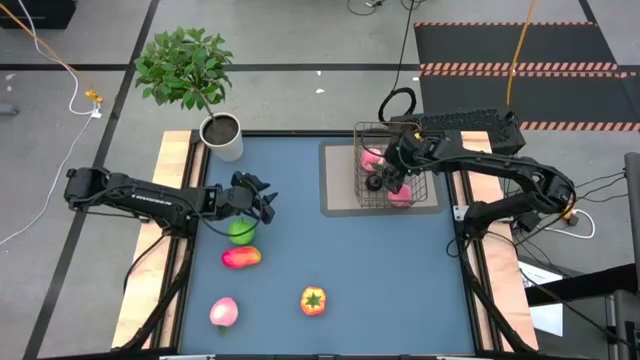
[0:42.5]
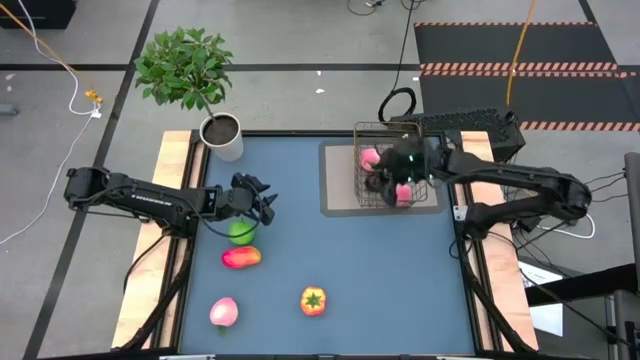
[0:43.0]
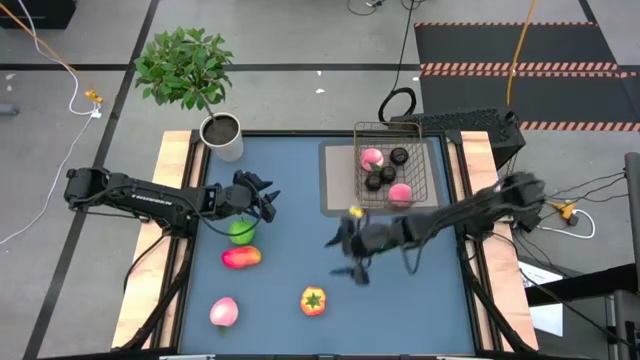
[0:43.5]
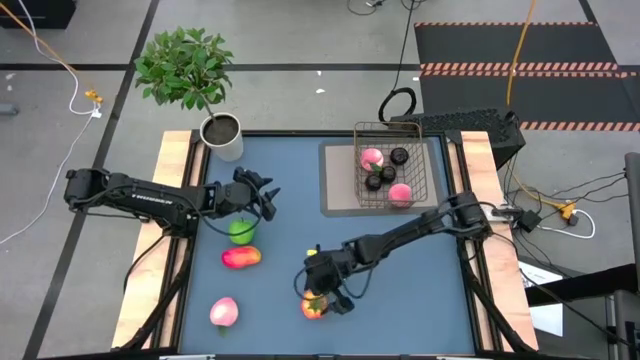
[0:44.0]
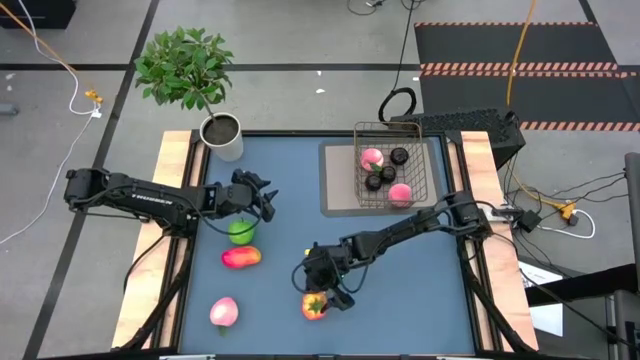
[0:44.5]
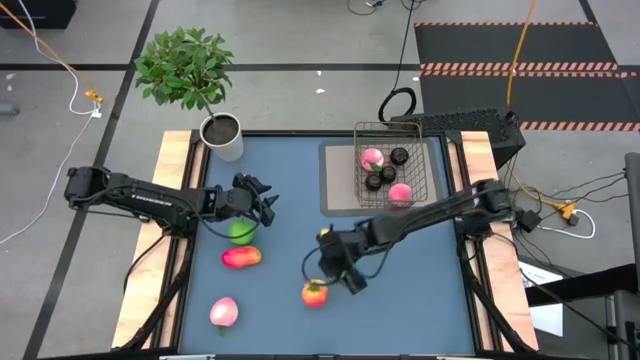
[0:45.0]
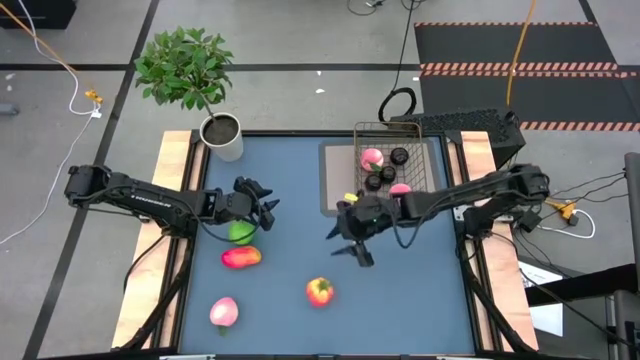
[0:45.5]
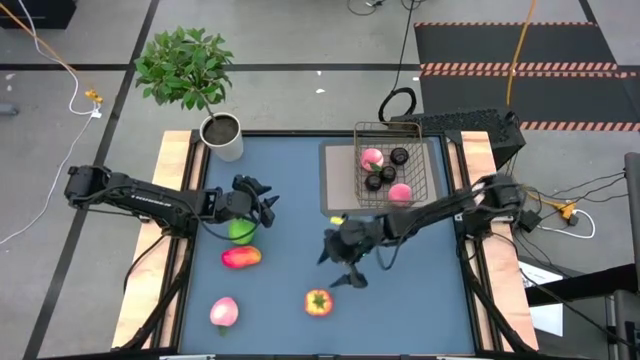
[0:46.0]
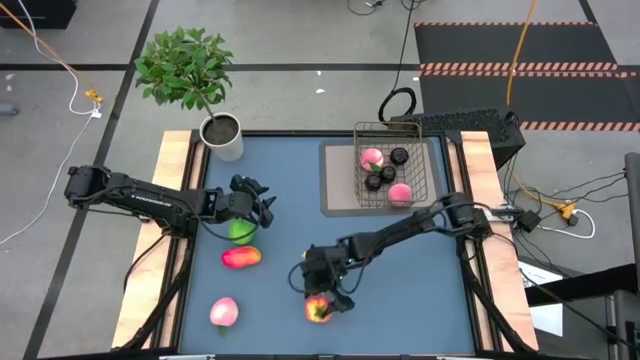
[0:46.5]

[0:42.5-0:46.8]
Task: Build produce basket
Put the orange tomato into the gold wire basket

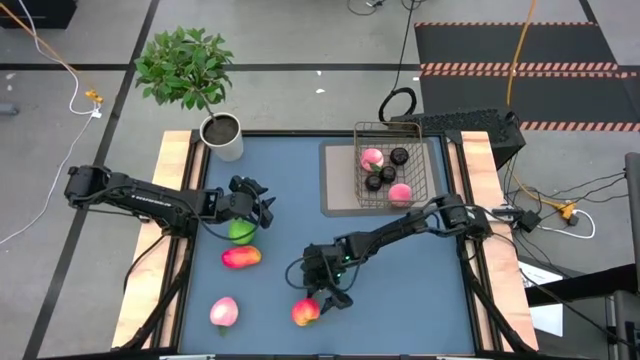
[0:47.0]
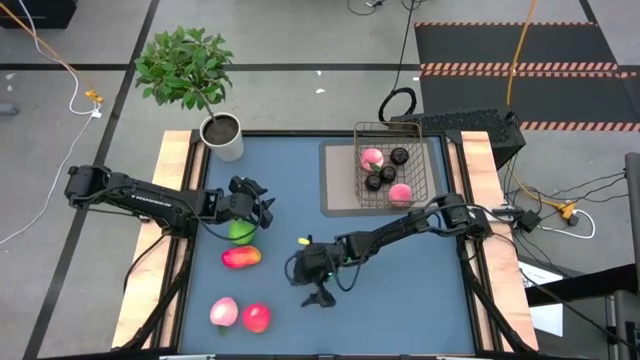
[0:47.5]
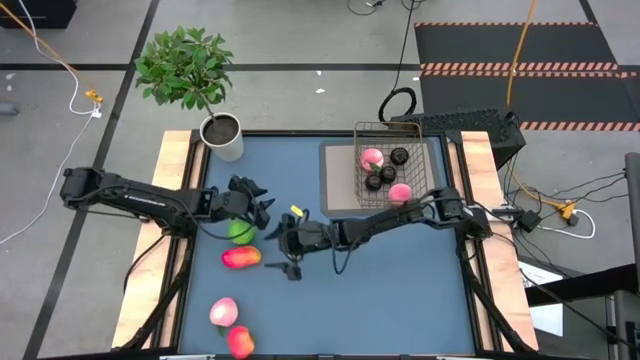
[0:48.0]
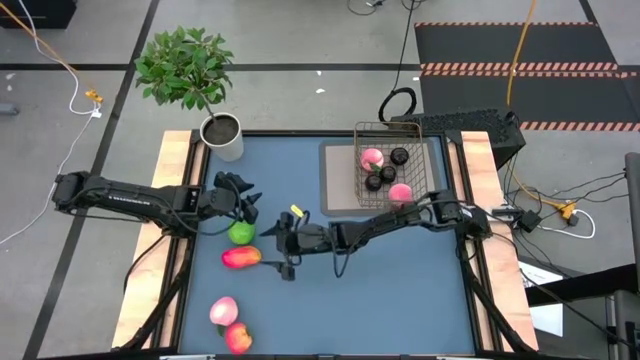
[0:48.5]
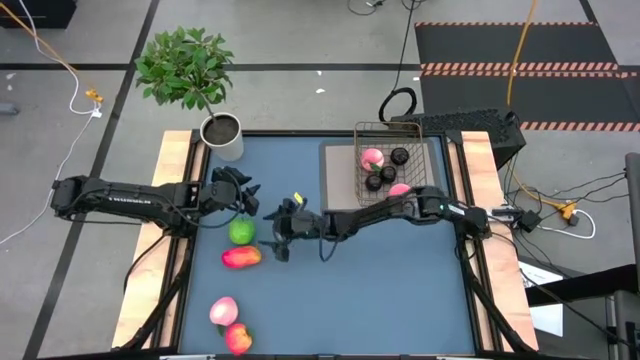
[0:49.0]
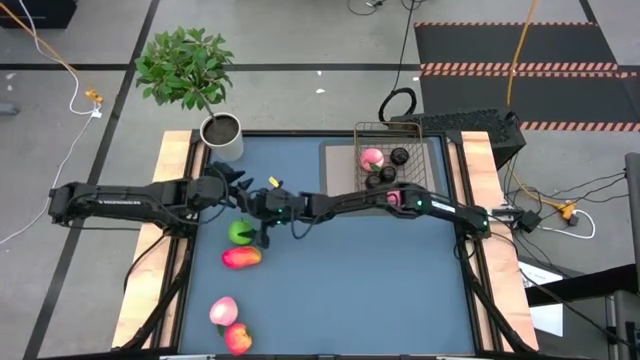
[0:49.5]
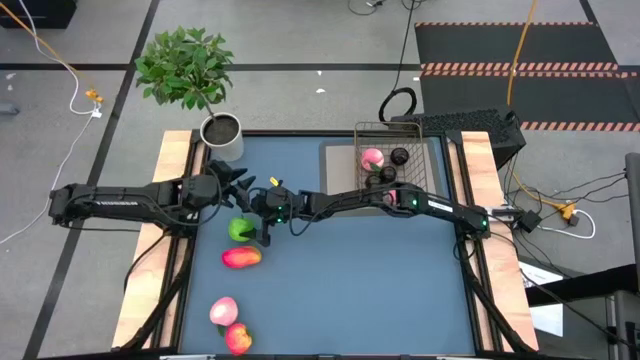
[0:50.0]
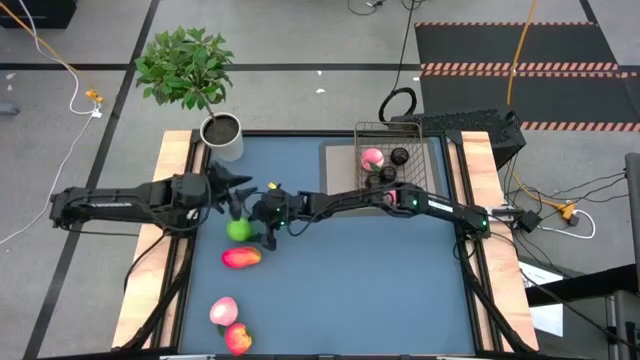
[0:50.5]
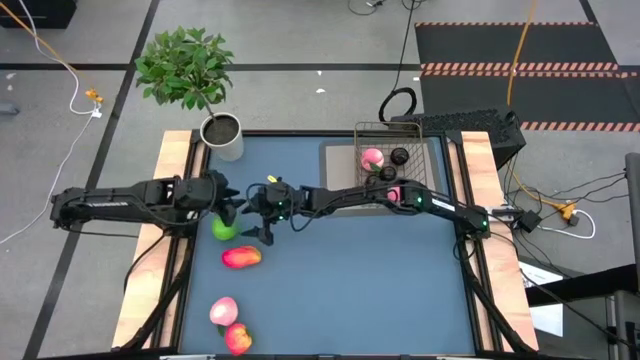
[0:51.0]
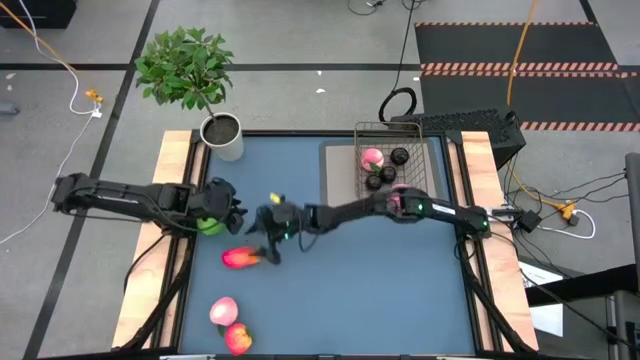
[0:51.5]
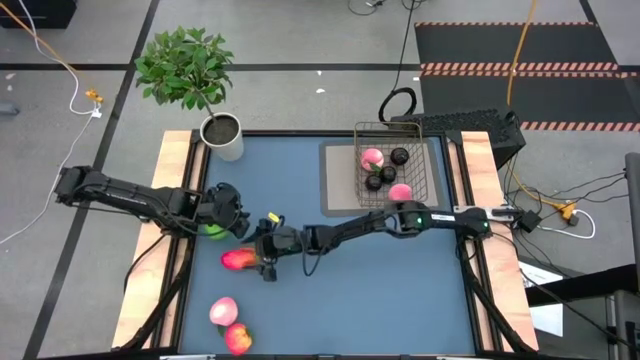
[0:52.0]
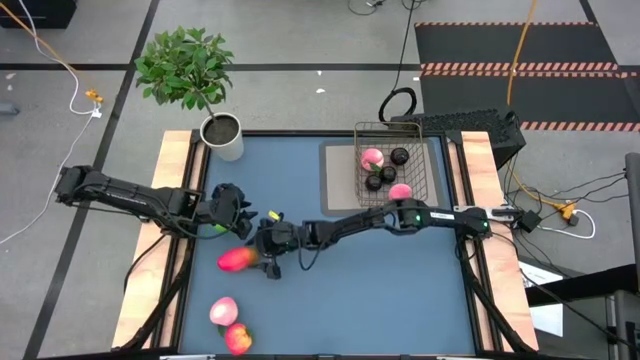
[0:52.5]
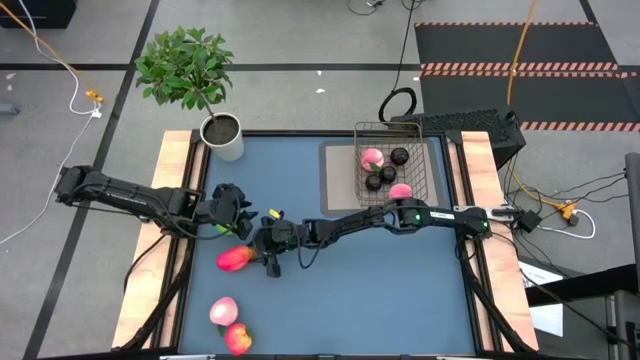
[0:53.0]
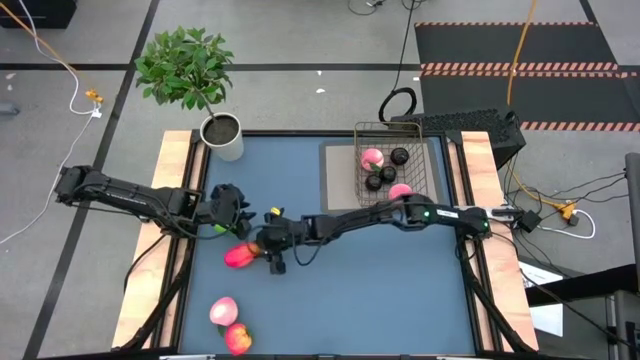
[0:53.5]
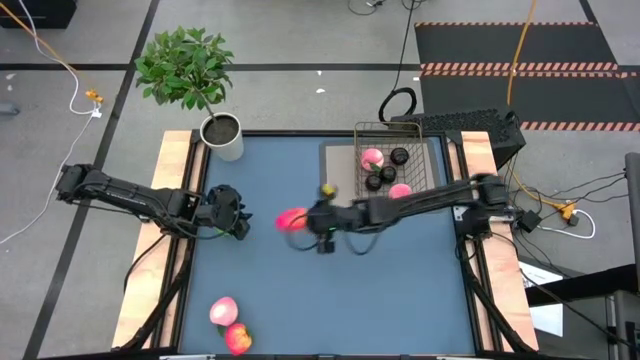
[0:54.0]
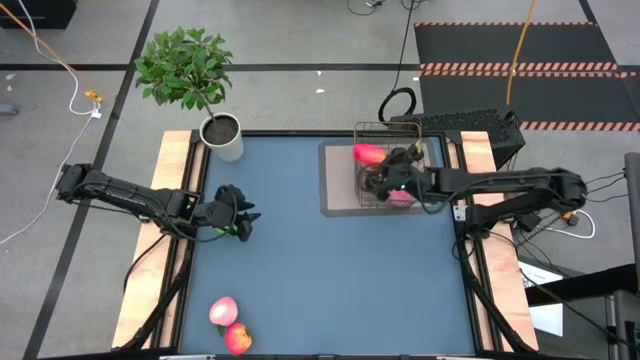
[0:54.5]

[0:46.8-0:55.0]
Put the red mango into the gold wire basket

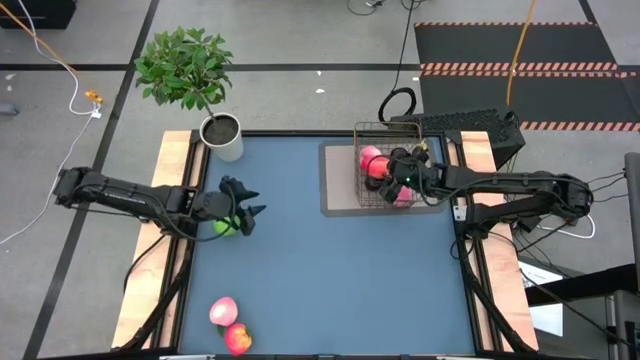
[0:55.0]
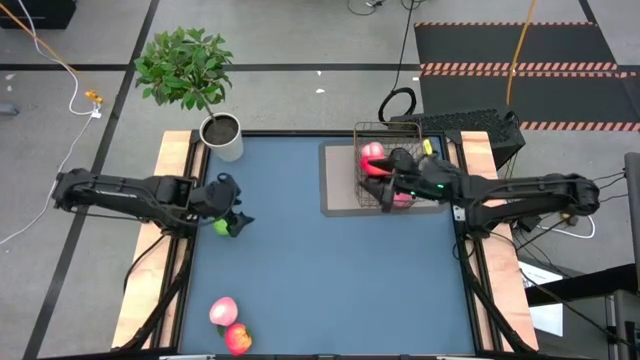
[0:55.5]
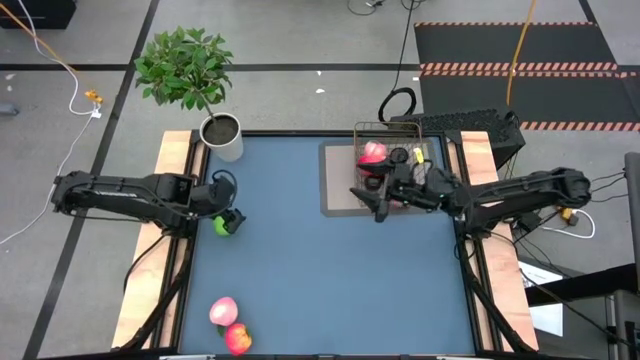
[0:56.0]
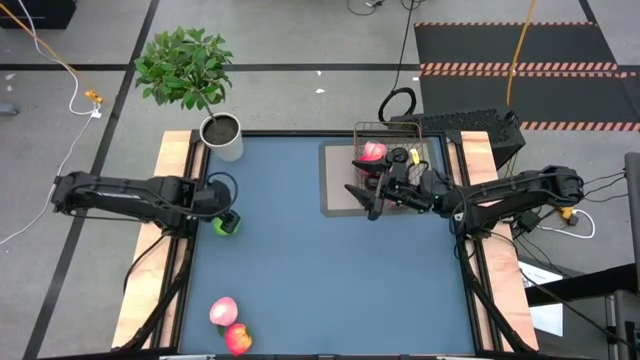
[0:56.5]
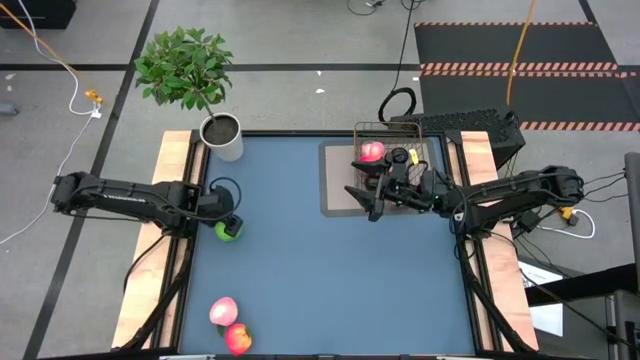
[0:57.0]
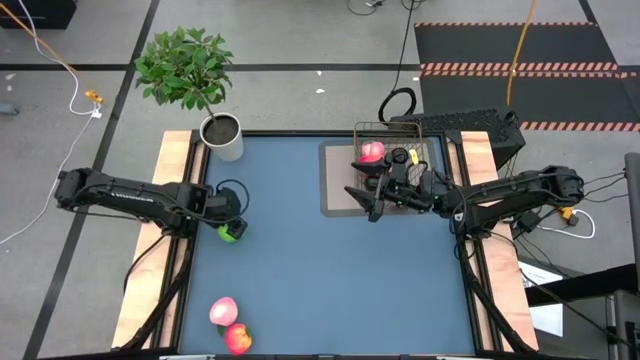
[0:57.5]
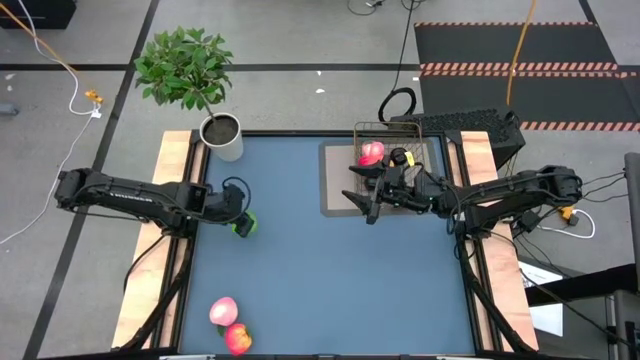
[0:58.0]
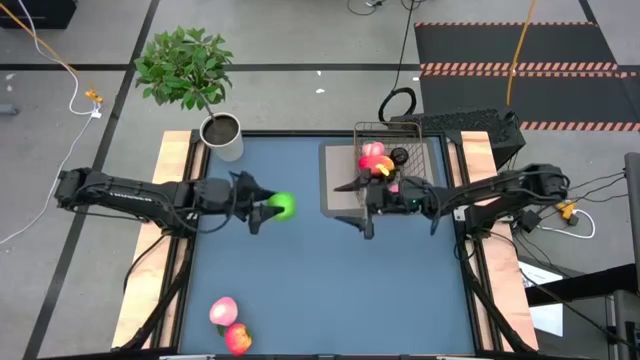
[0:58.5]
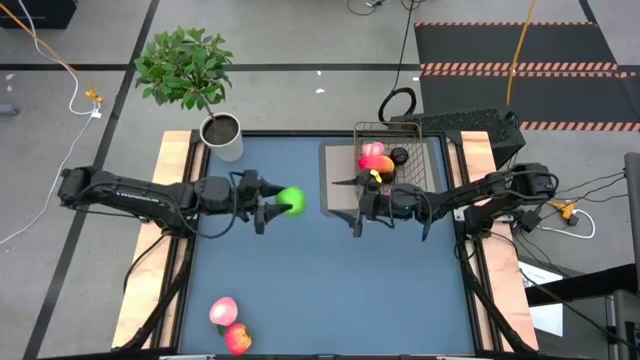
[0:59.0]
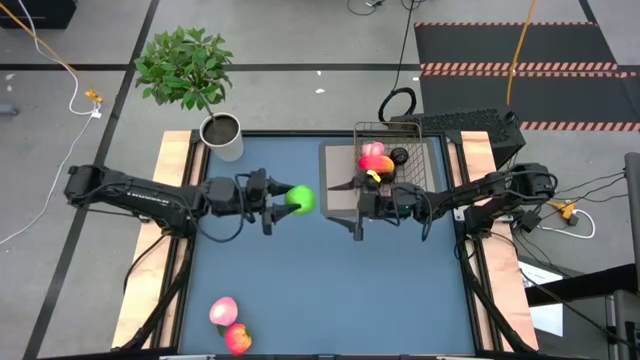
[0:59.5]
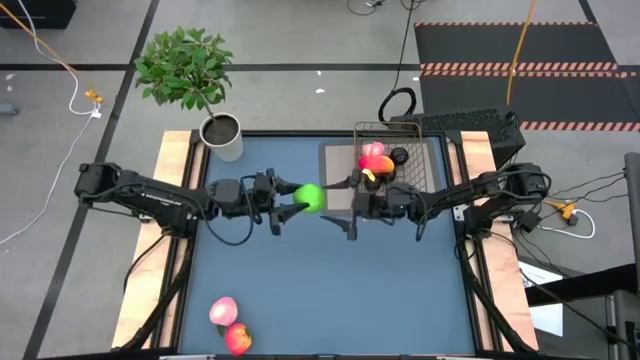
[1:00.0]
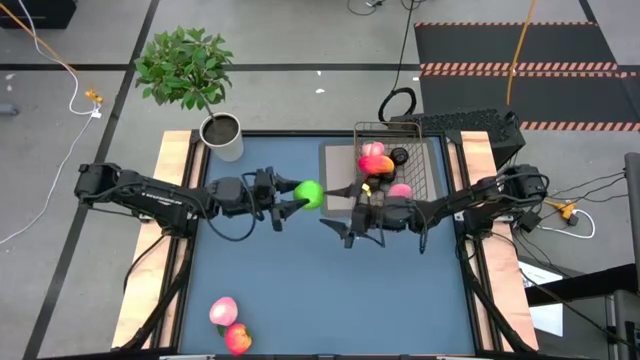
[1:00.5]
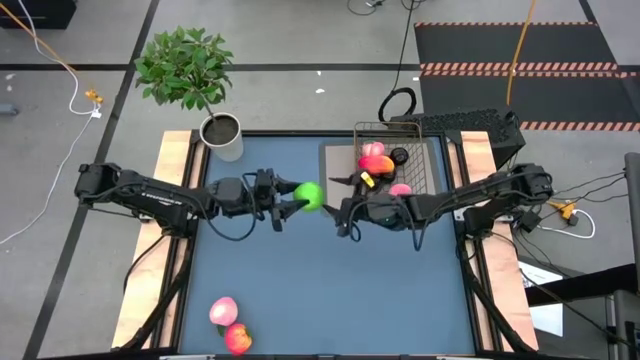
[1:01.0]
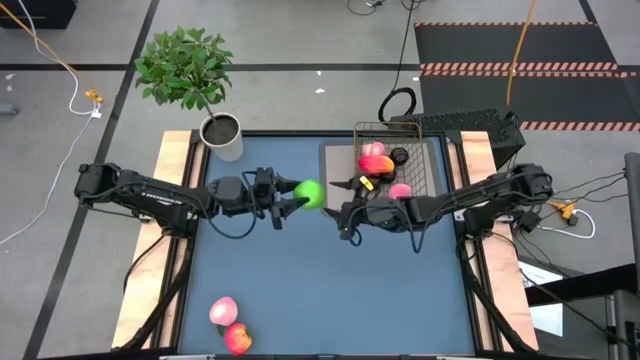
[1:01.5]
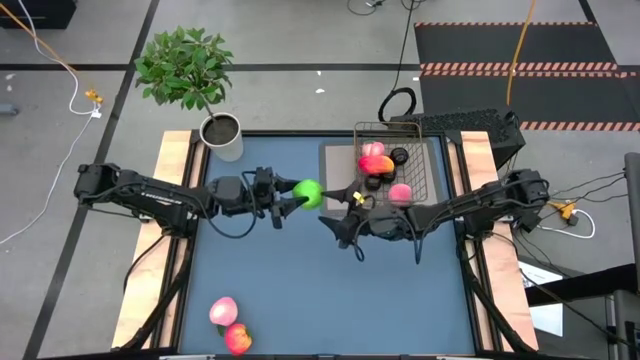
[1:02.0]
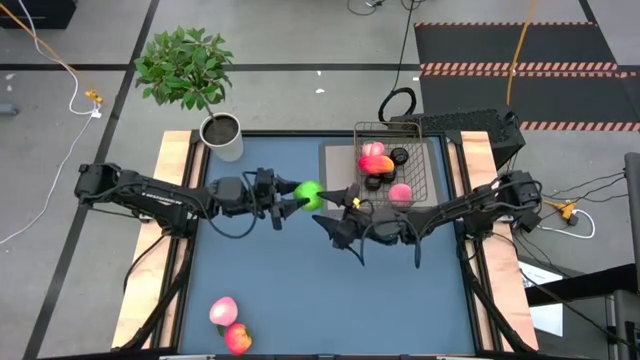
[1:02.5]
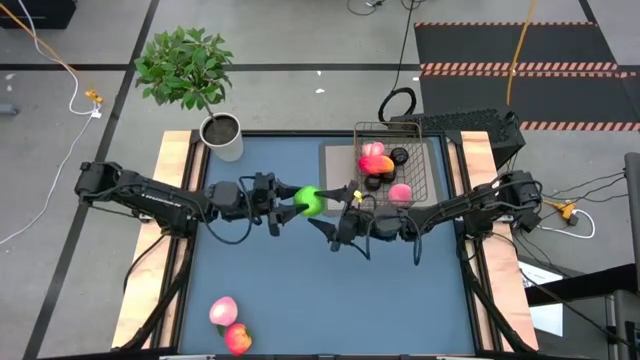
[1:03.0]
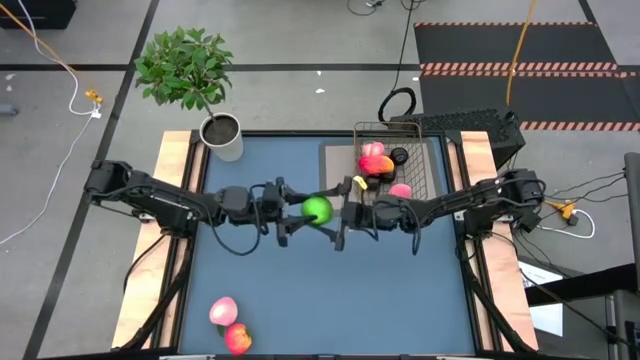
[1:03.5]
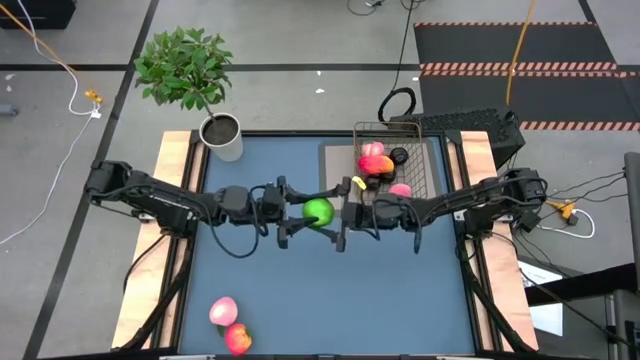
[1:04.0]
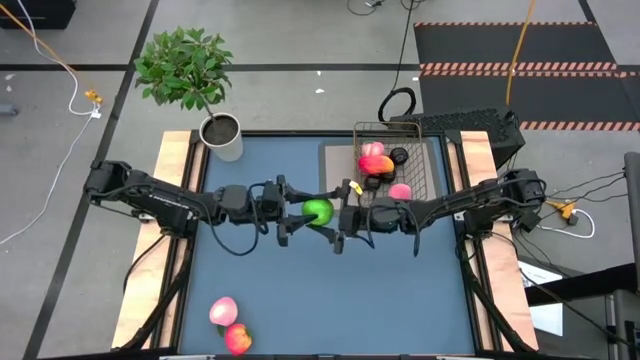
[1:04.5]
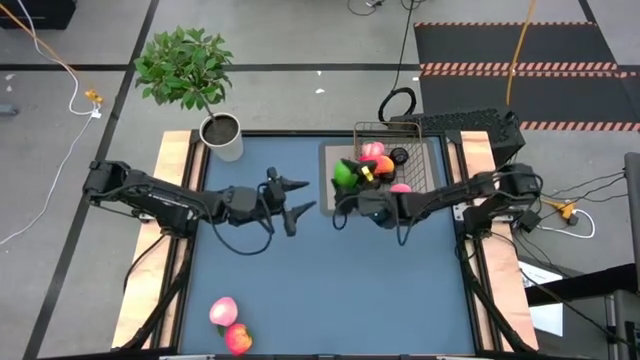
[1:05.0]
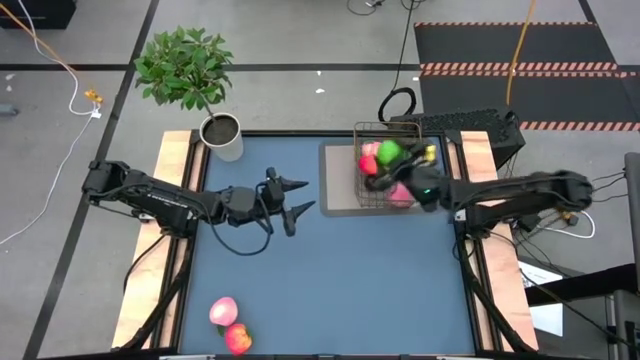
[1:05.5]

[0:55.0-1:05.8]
Put the green apple into the gold wire basket
